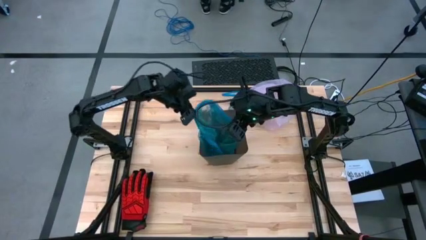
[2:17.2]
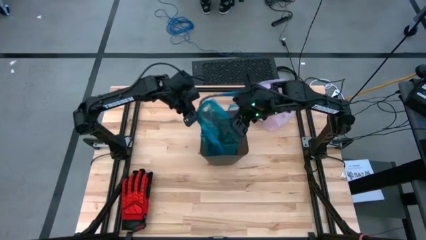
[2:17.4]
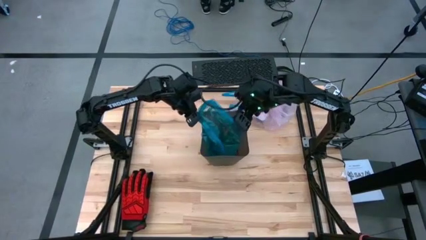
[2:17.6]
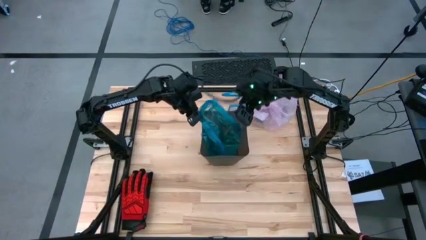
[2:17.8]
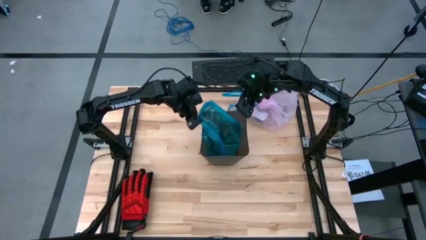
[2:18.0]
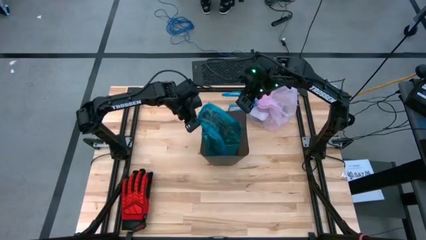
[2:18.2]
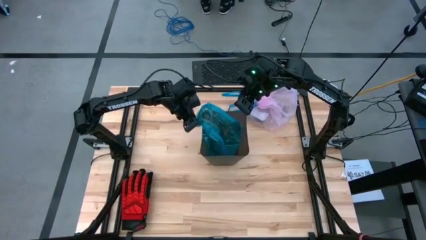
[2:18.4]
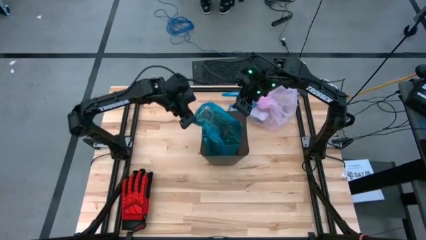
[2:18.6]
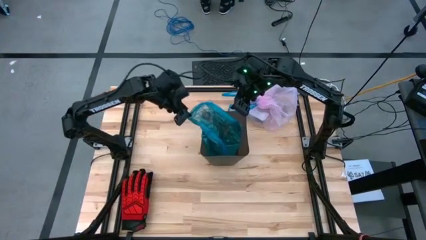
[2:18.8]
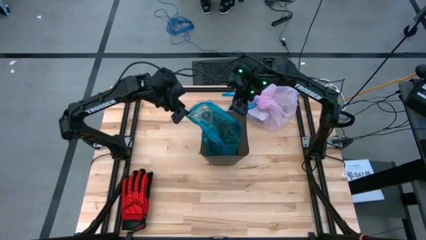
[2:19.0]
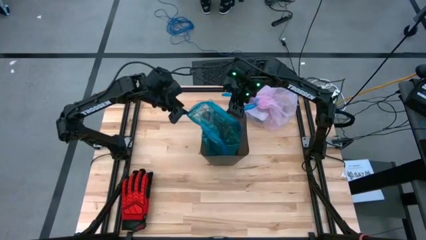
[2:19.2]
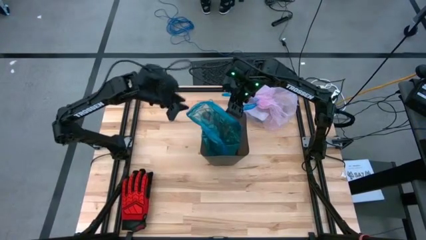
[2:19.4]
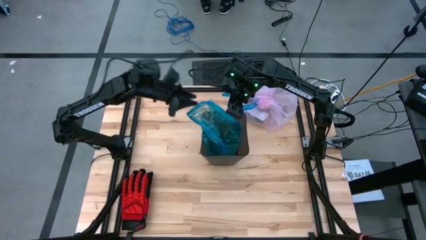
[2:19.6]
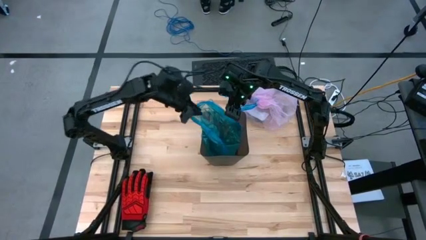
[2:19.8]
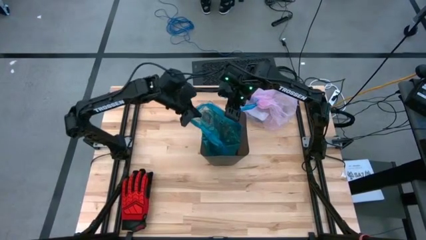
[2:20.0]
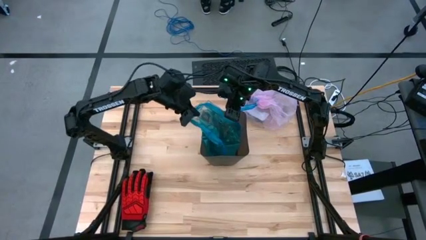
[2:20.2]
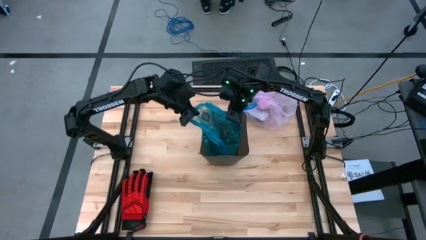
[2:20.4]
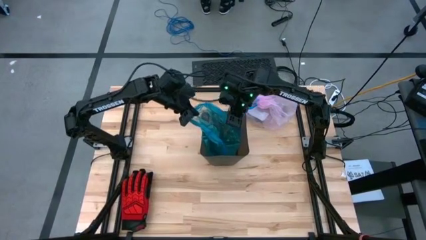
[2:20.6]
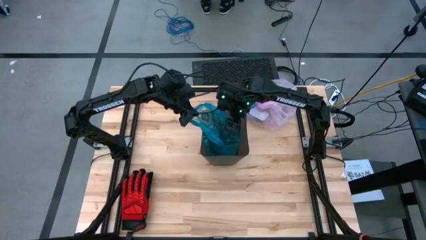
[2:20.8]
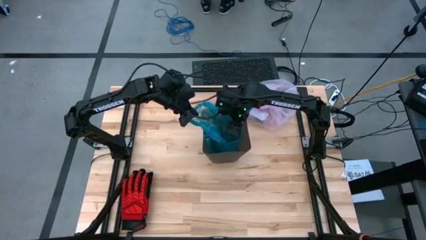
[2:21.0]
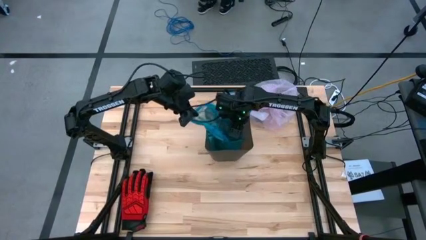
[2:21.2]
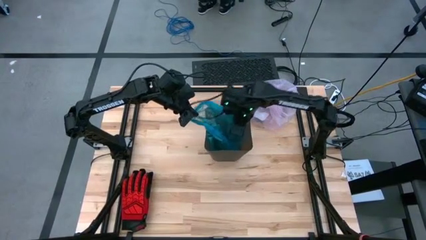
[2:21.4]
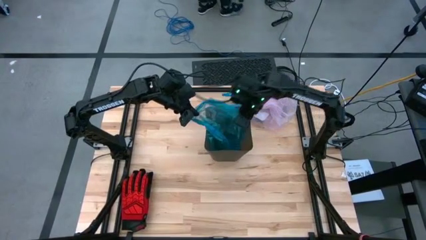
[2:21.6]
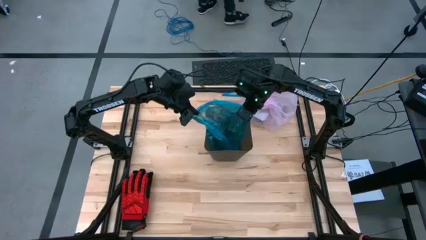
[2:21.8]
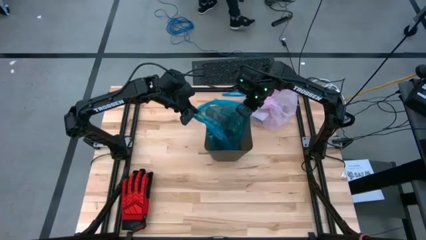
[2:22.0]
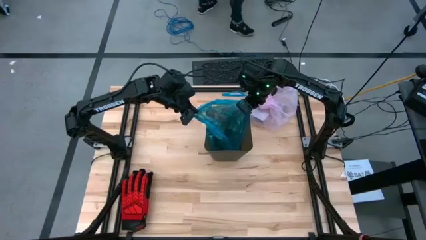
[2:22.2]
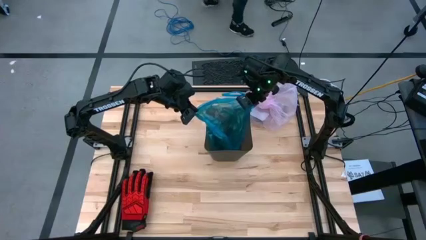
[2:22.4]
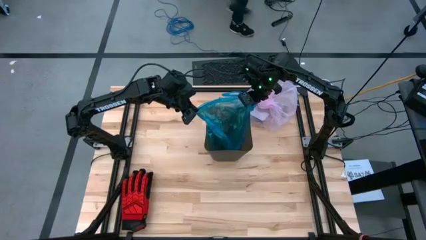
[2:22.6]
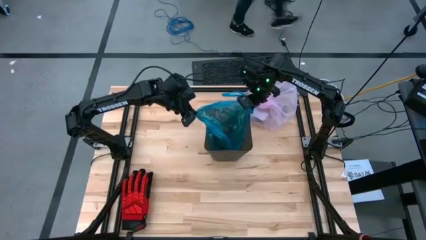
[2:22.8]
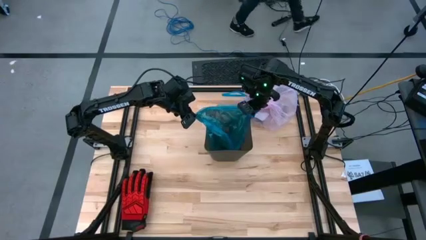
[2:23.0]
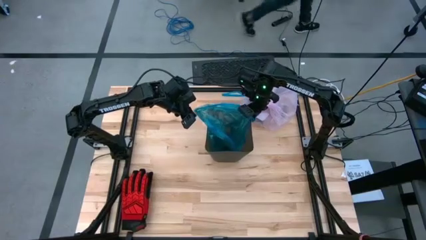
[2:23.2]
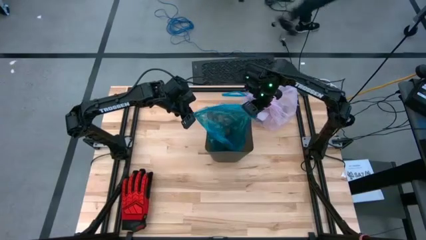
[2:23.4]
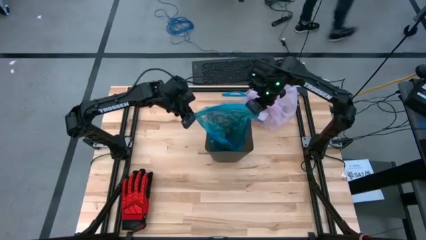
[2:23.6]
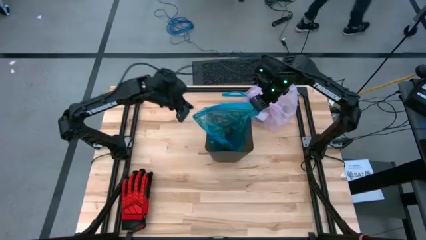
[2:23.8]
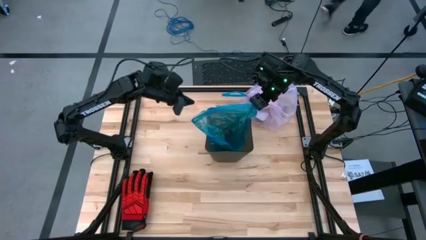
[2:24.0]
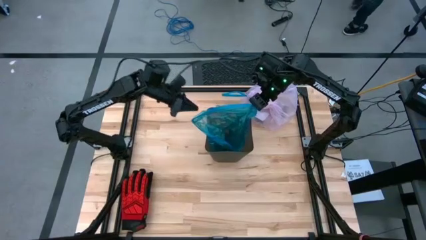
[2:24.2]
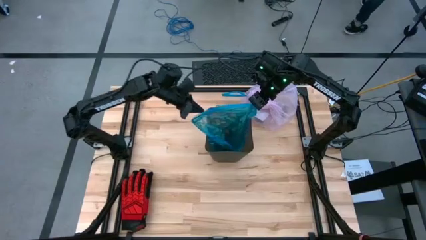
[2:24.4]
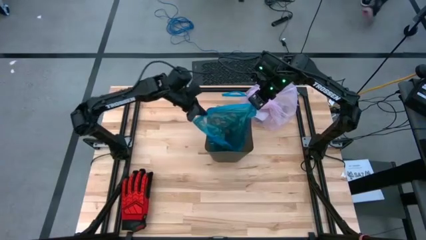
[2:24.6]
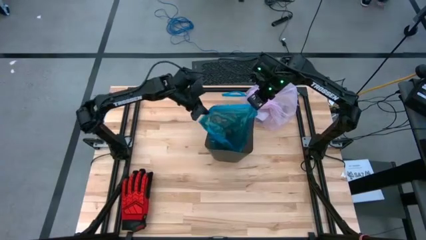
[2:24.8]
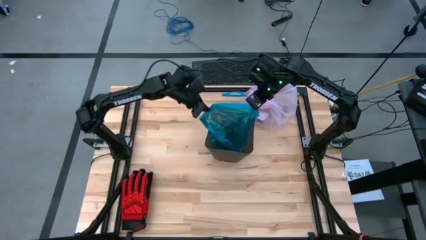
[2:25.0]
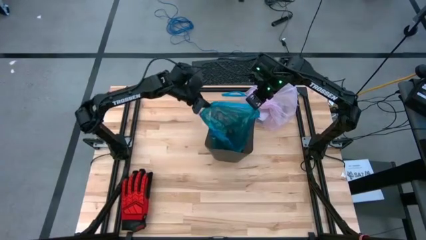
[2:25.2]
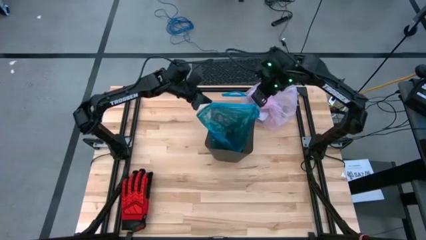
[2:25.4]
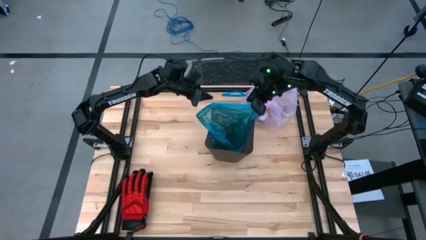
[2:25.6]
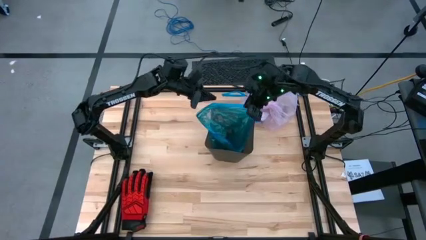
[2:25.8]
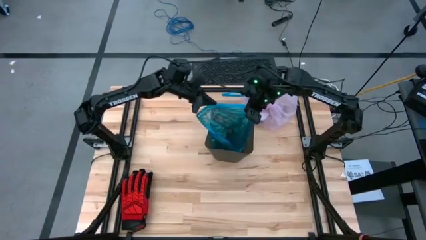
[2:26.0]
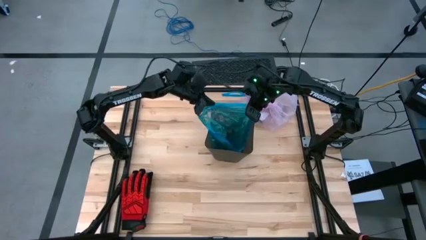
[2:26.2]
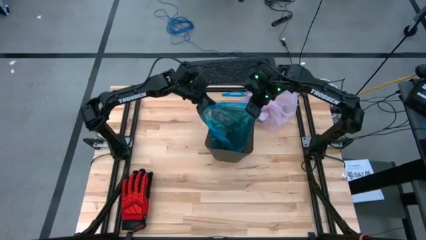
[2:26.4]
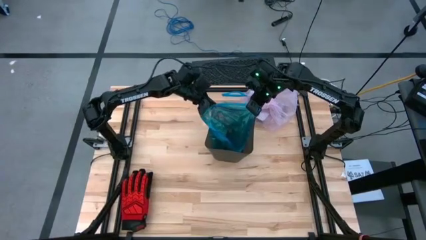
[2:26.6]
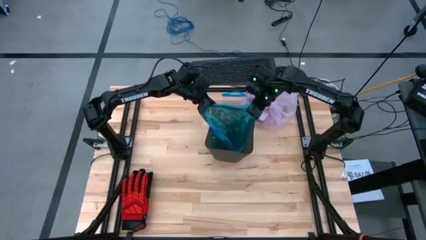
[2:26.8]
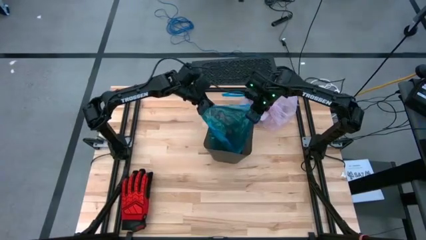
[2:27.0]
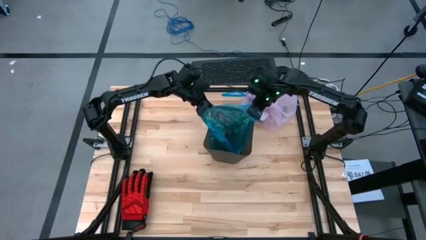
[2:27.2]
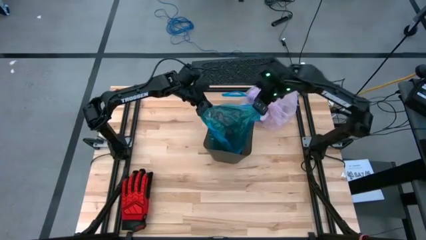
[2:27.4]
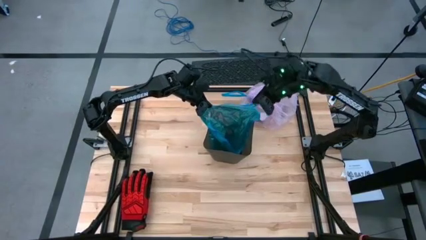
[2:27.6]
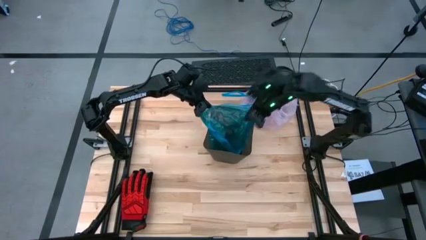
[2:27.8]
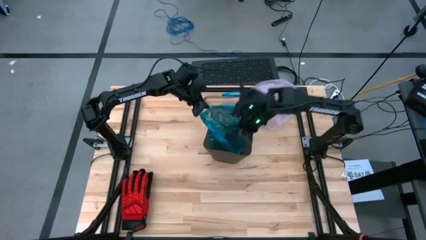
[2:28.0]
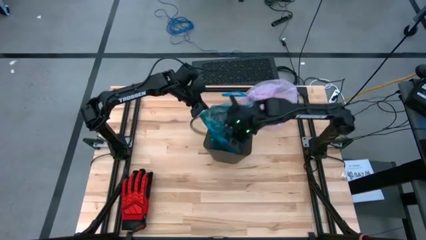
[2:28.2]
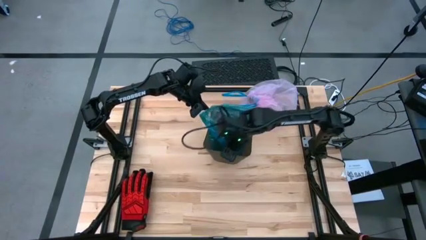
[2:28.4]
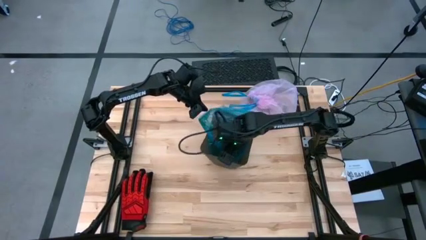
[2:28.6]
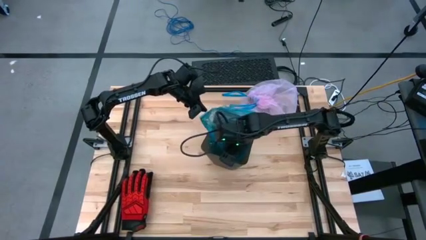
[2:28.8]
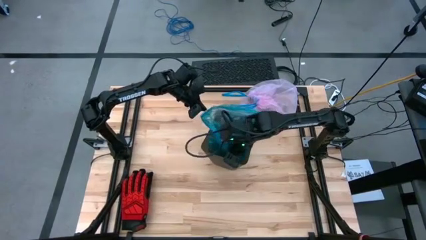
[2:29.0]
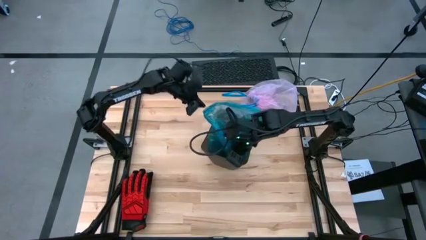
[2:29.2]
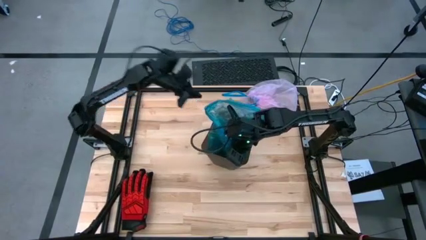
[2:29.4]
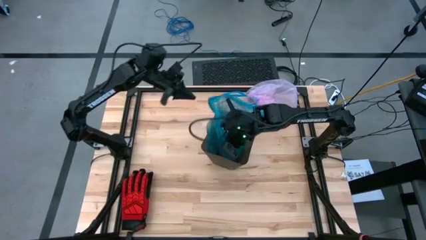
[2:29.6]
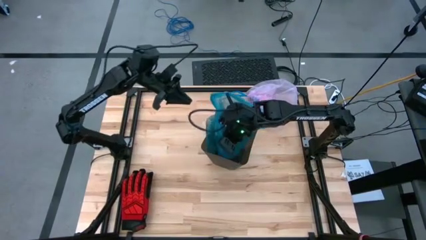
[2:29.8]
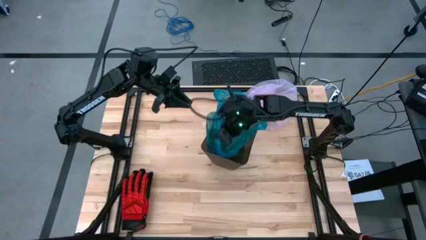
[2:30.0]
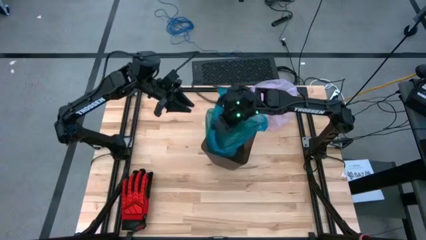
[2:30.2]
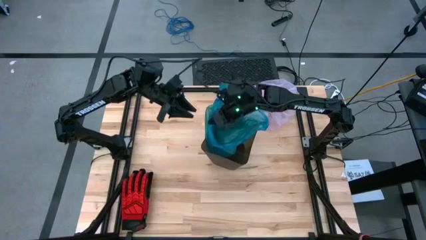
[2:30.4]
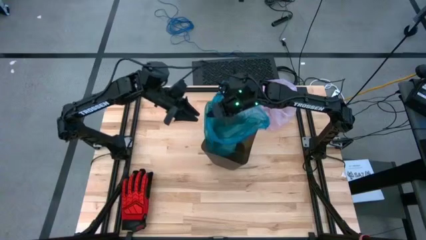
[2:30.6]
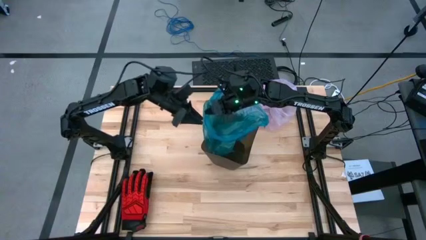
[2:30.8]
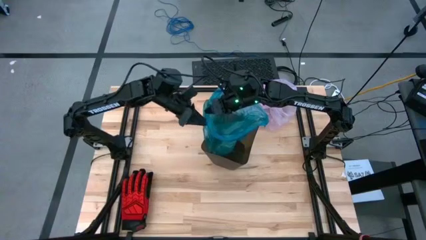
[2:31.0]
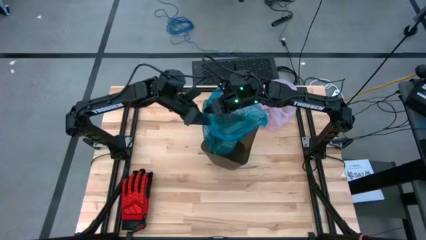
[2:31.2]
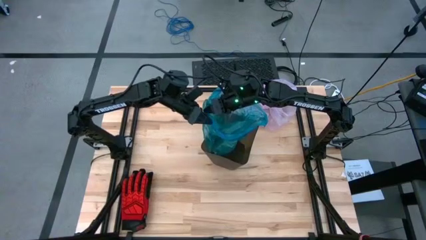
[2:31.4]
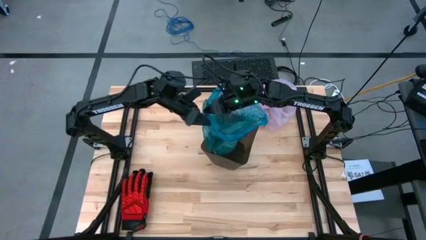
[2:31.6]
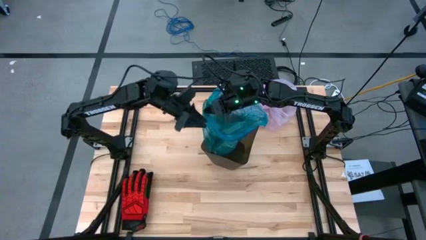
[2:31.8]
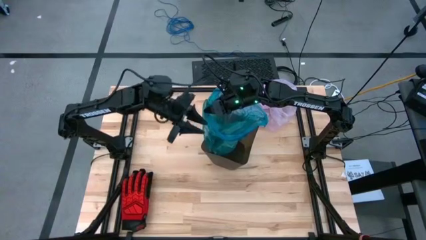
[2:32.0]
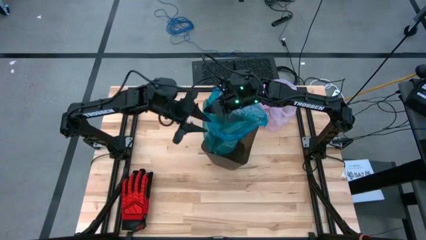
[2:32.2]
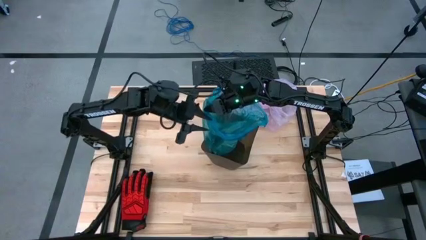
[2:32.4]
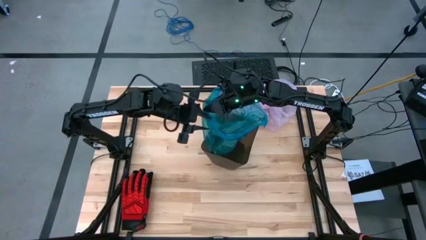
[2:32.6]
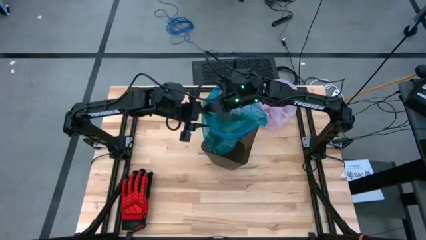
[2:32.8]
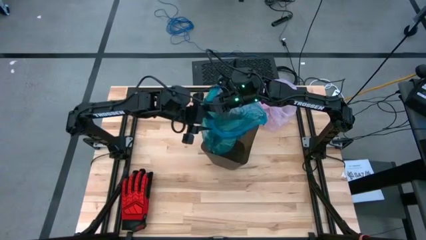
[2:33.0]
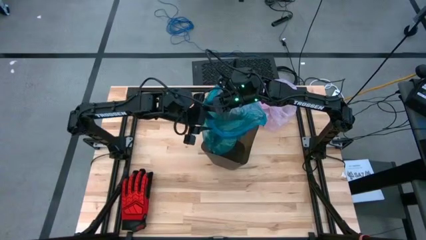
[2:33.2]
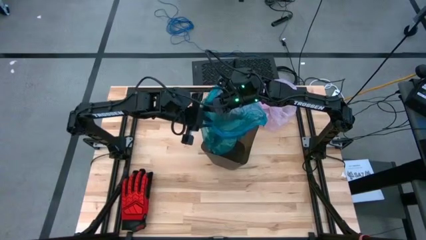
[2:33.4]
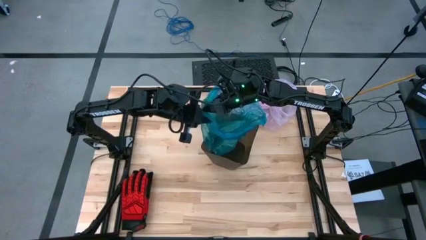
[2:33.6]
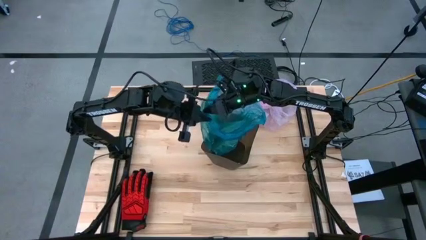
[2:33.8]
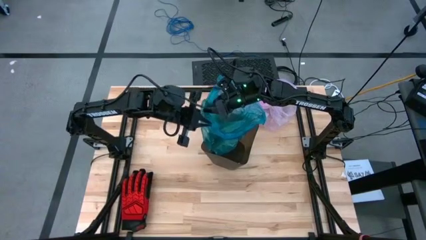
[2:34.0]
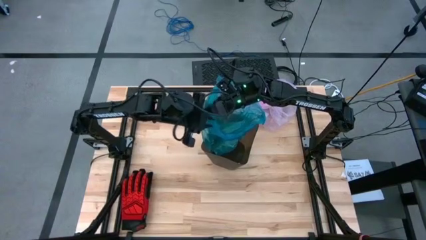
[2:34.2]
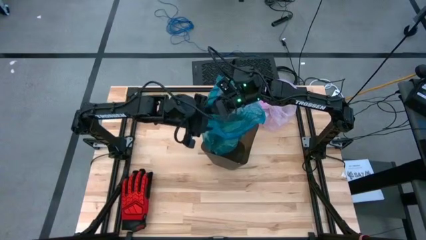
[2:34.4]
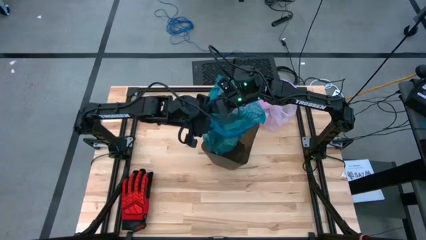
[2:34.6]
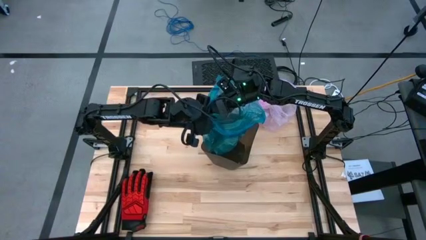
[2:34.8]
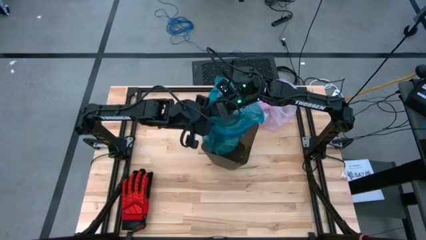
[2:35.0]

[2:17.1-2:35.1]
Task: place trash/remove bag and relplace
Insert the blue trash bag into the trash bin
